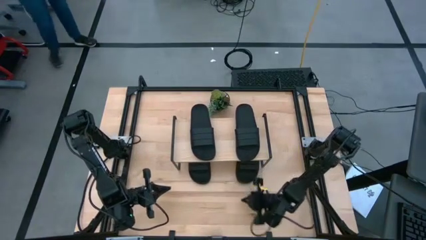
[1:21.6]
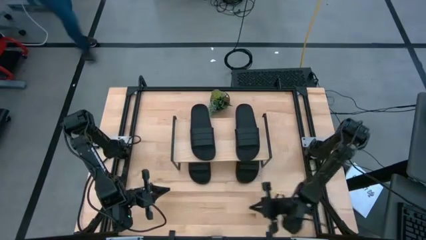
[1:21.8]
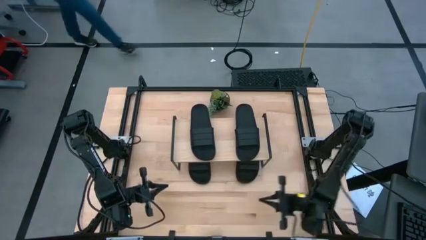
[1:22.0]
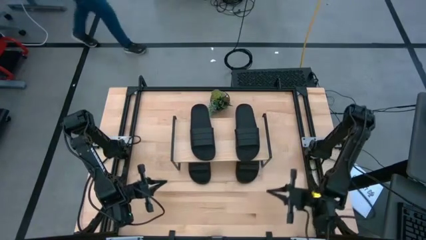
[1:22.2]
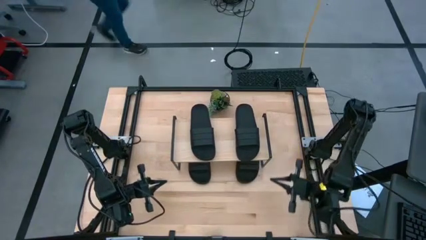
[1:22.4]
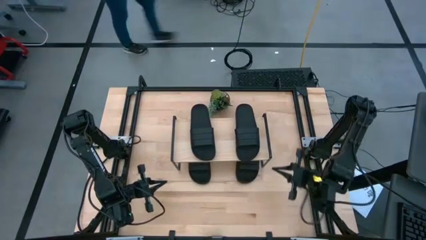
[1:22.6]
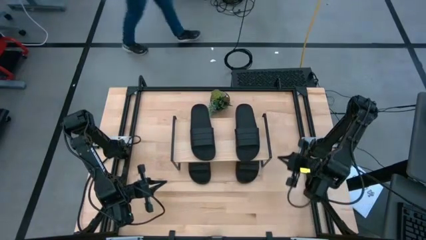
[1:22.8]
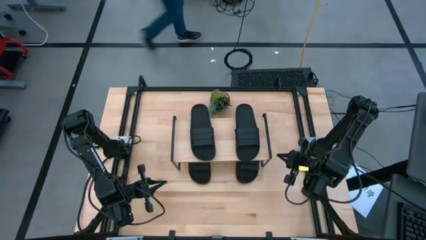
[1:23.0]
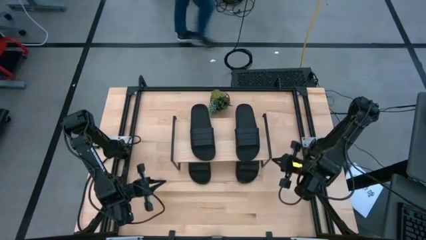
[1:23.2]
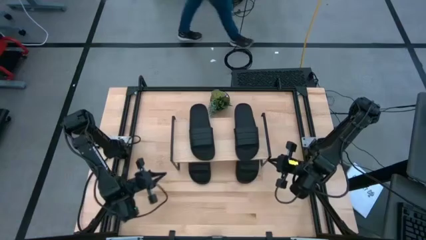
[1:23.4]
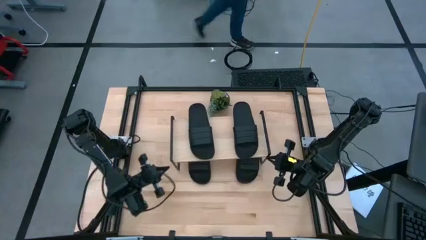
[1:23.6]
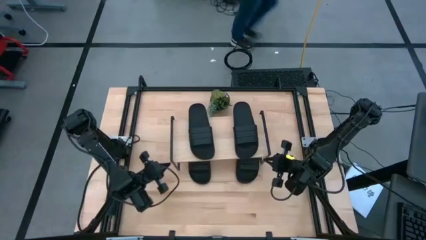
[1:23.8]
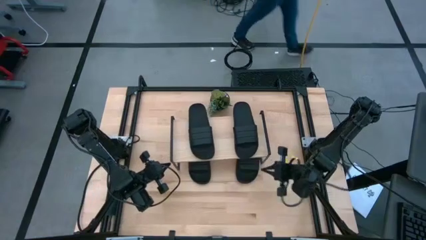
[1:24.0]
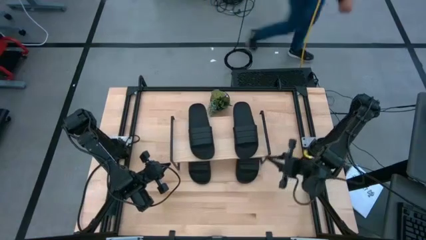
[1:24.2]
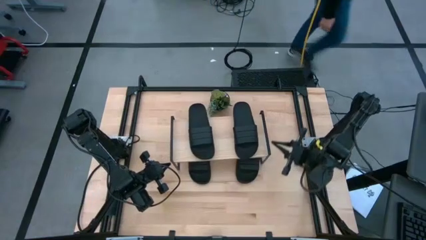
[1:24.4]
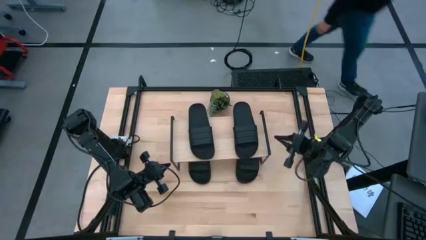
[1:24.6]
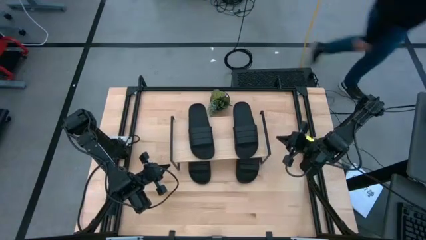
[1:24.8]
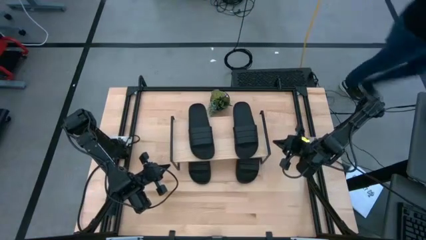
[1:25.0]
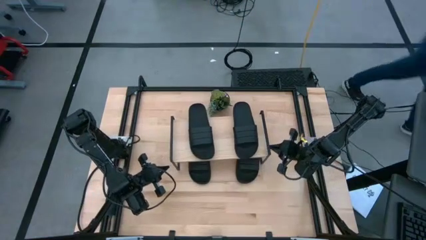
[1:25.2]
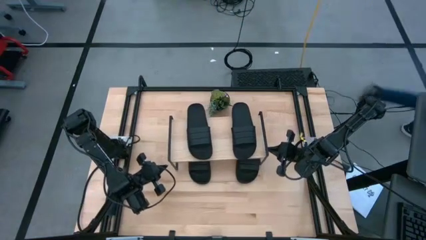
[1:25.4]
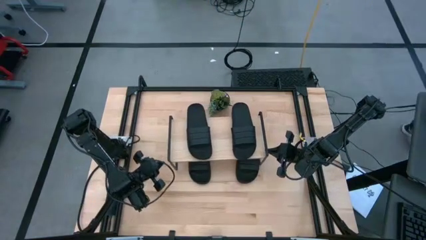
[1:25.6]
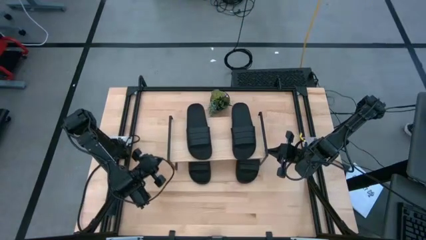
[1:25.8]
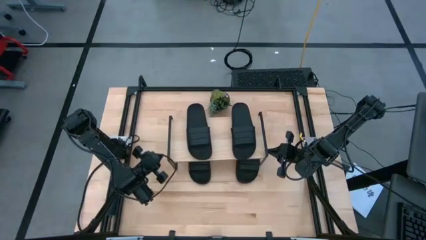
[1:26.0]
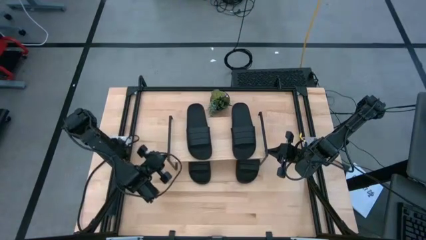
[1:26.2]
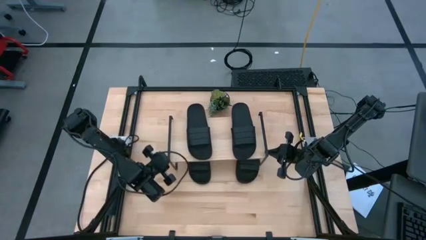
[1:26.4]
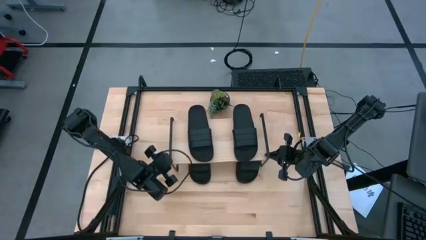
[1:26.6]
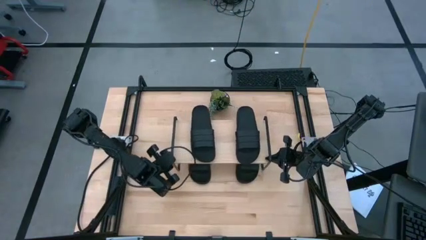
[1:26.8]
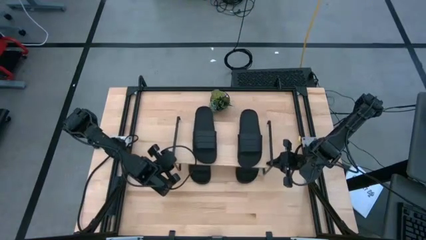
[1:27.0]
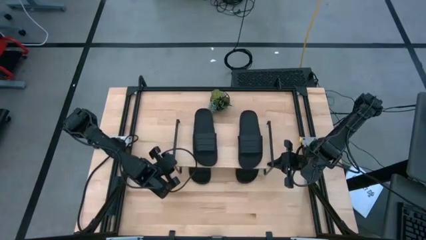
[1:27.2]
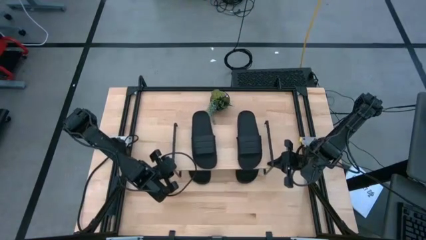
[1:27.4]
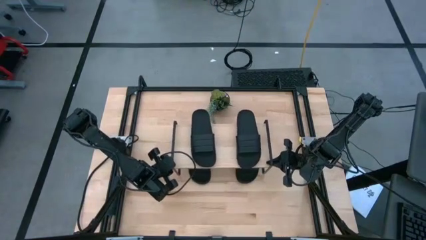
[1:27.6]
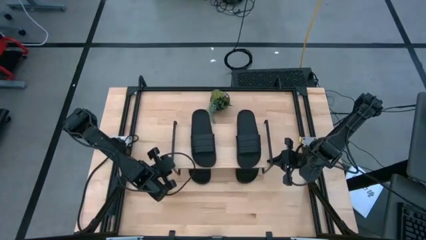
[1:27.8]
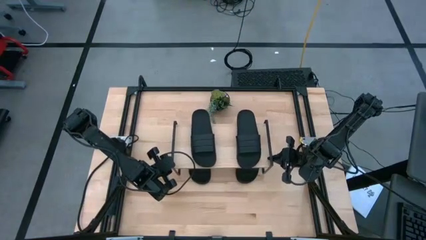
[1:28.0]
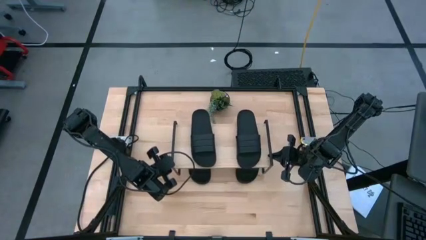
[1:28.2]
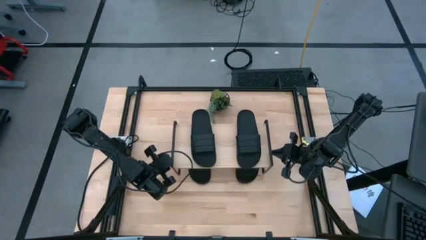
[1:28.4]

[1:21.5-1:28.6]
Task: Pick and place slides into the shelf
Adjust the shelf

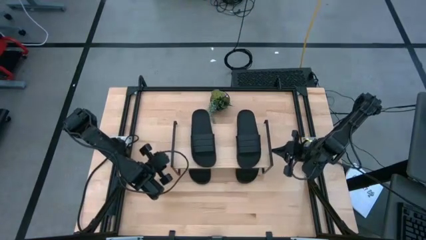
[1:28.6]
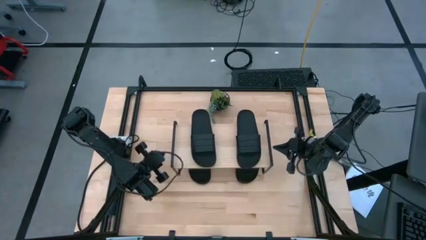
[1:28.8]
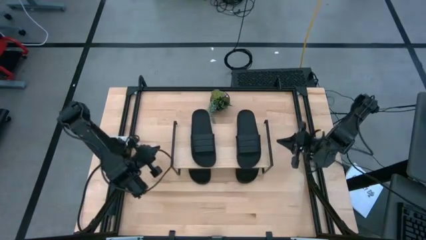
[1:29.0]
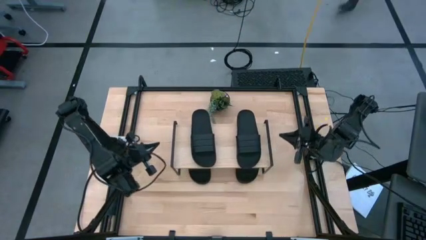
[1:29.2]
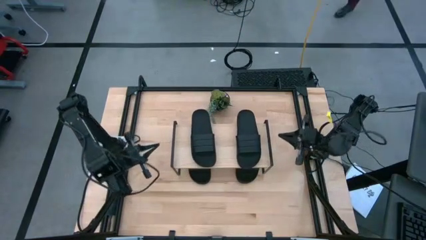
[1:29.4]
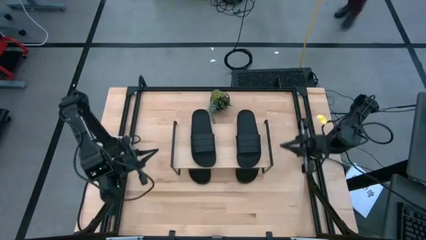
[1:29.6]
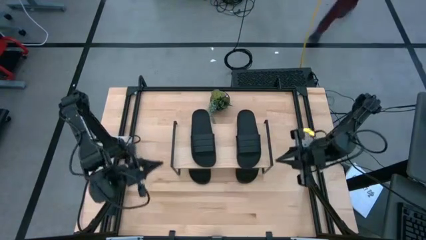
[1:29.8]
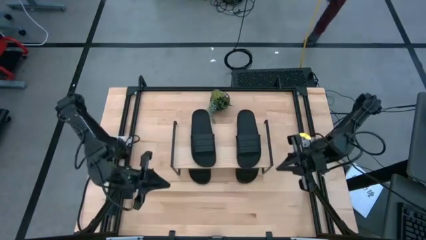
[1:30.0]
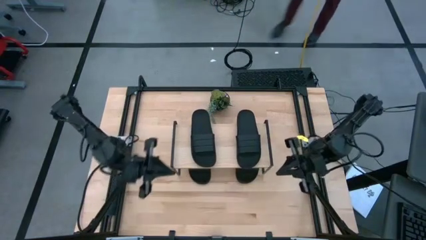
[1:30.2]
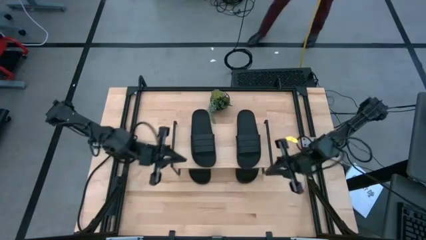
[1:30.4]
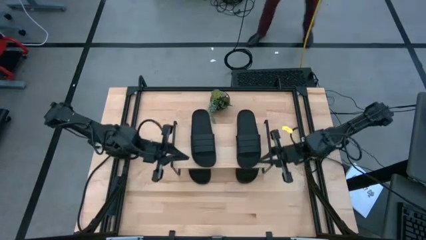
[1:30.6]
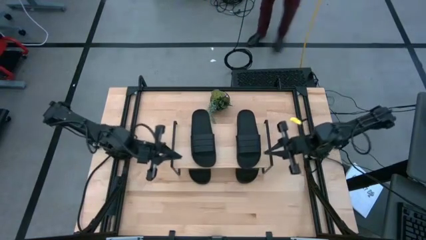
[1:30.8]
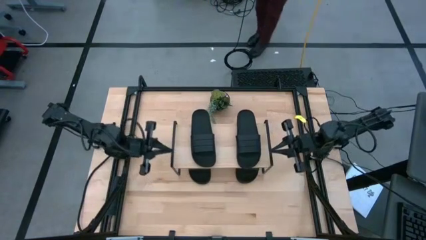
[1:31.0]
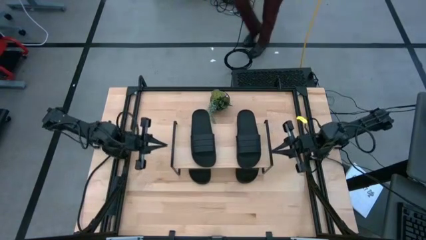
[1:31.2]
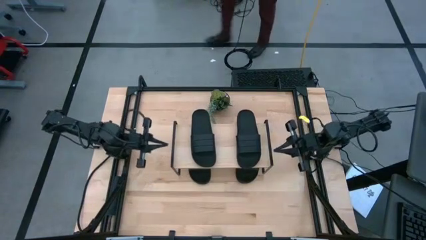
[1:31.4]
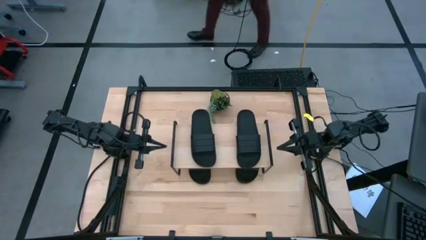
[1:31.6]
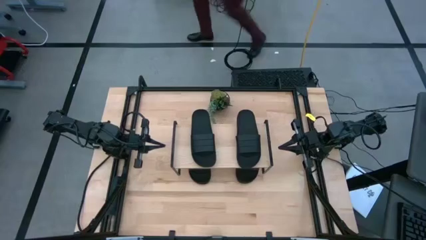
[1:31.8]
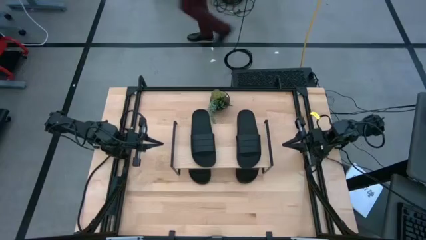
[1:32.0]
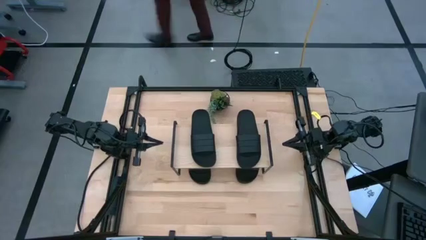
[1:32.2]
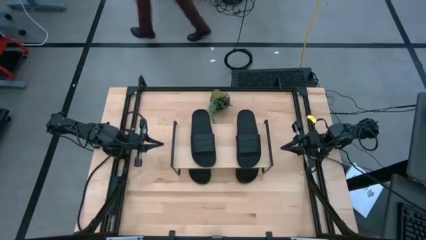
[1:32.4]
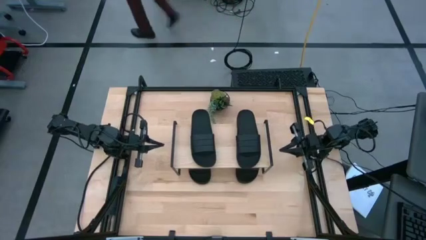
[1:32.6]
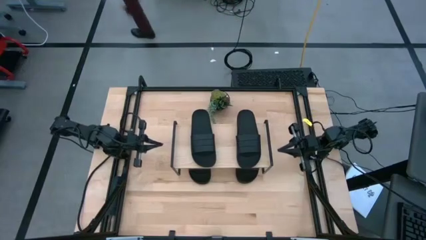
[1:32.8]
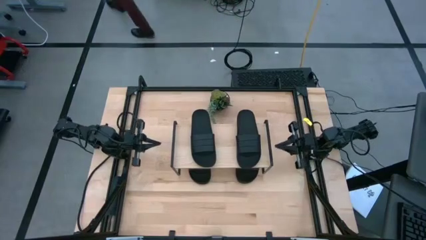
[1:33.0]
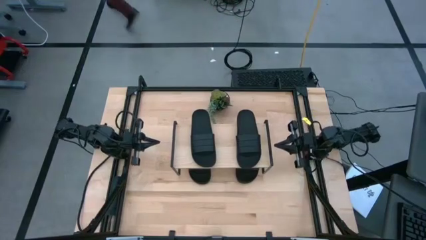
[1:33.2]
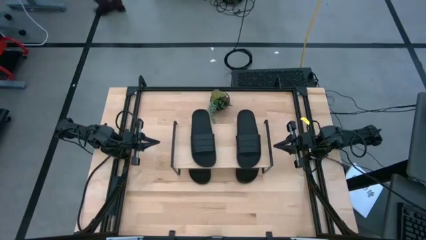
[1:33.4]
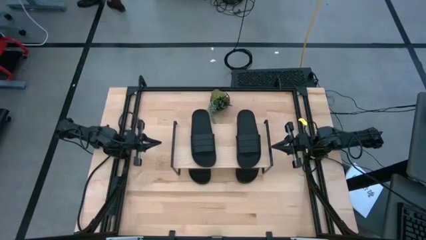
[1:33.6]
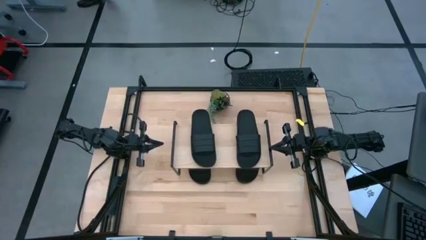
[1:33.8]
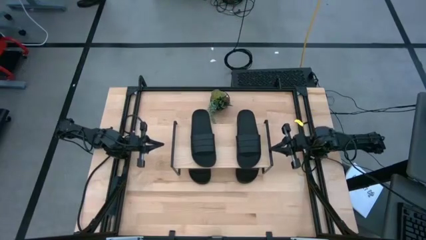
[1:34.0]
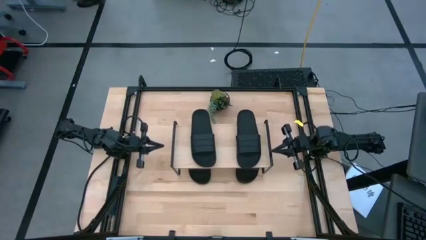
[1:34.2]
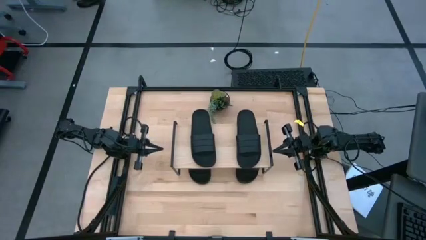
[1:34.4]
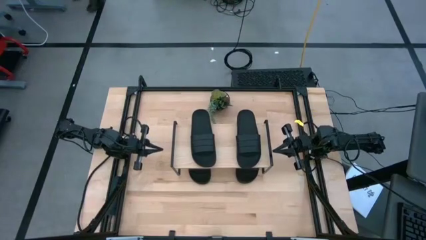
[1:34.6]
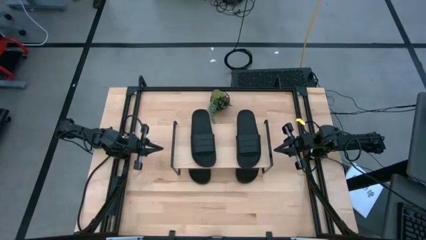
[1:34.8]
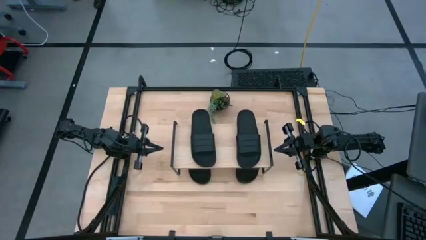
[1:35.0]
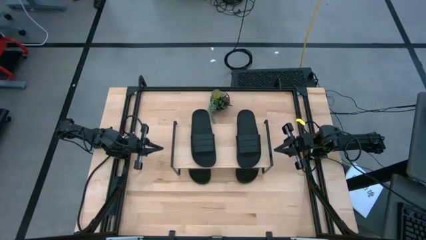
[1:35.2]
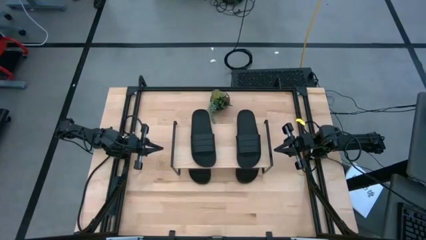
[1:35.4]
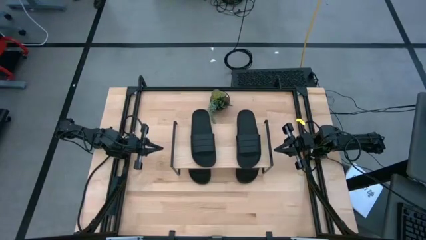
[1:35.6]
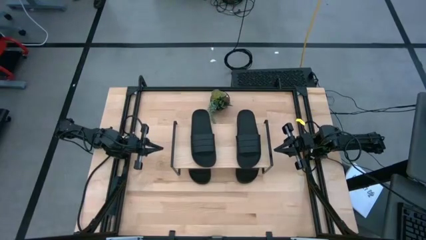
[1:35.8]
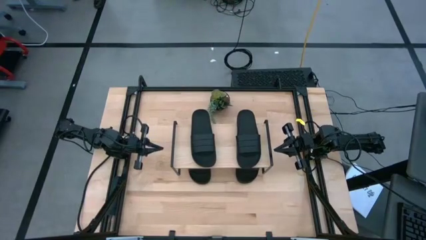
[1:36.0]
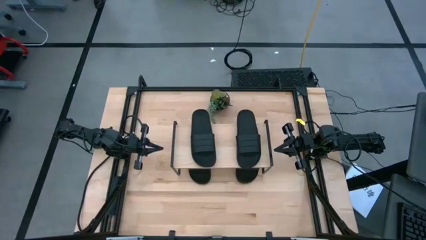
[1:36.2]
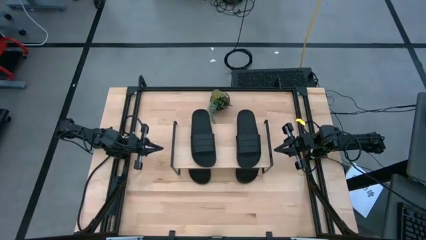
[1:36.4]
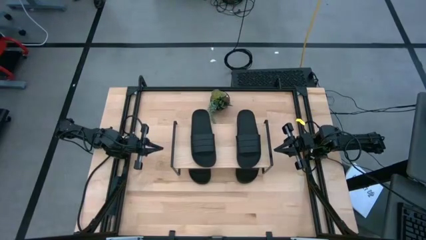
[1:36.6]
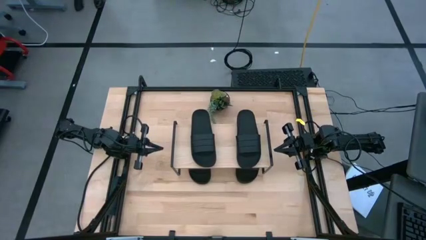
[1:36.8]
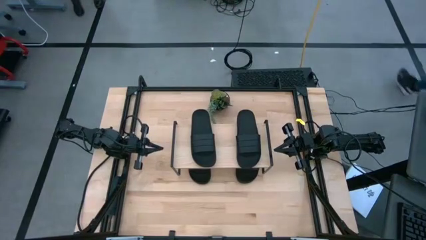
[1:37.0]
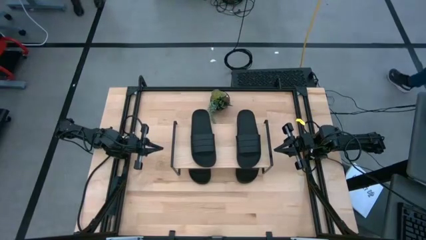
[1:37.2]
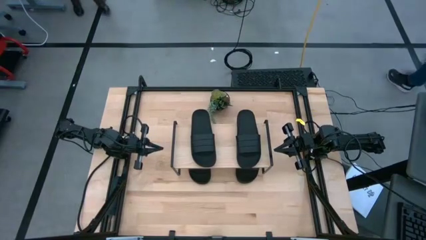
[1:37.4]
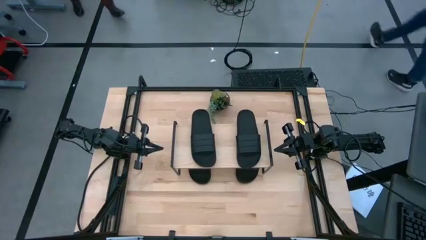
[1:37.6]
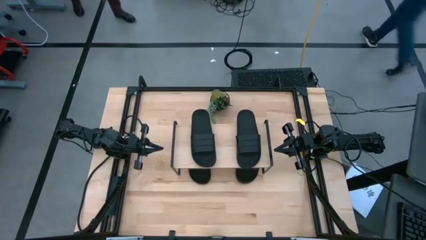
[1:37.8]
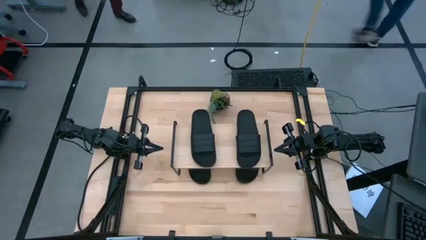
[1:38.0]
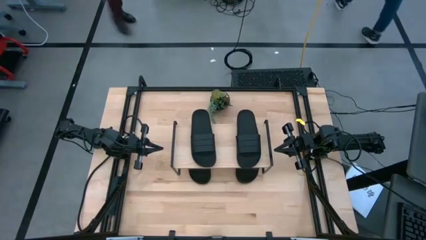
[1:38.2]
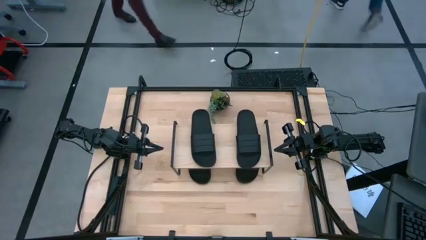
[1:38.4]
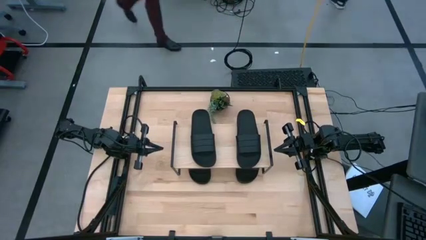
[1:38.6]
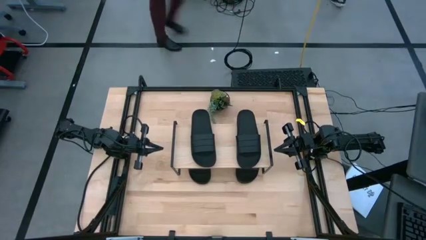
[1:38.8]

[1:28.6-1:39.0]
Return to Home Position
